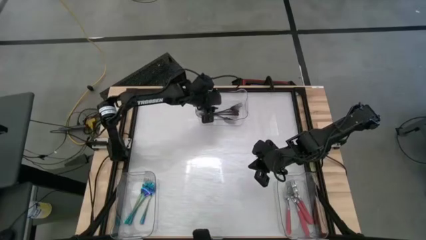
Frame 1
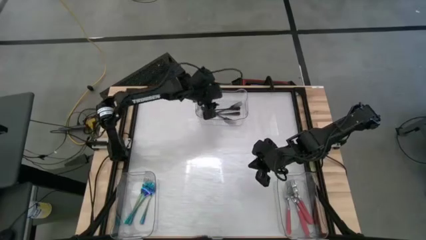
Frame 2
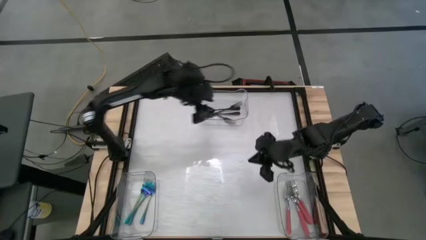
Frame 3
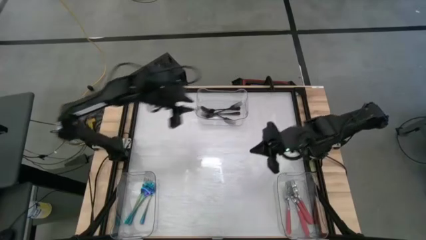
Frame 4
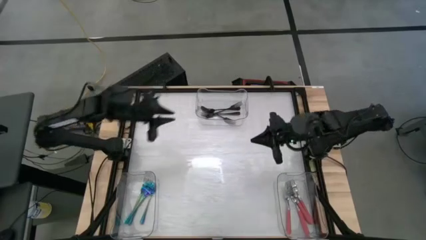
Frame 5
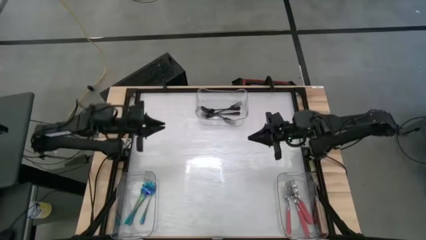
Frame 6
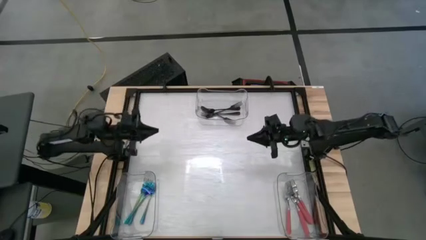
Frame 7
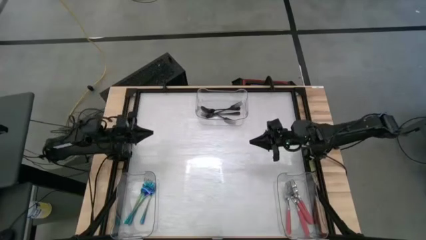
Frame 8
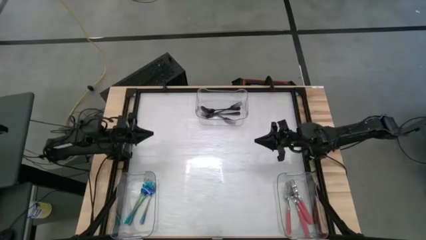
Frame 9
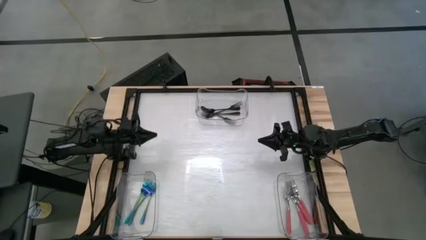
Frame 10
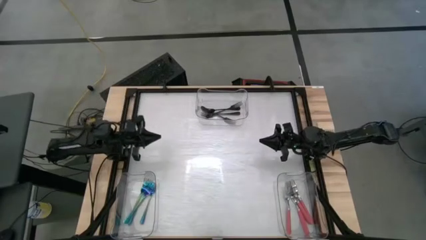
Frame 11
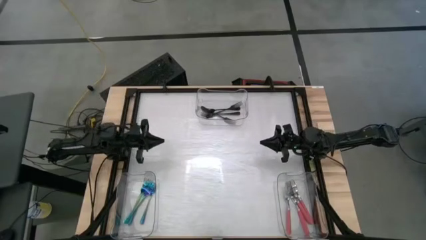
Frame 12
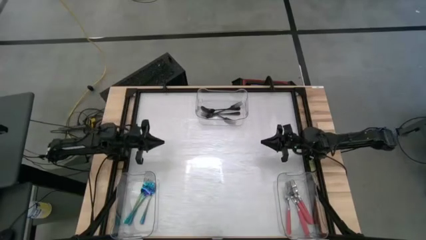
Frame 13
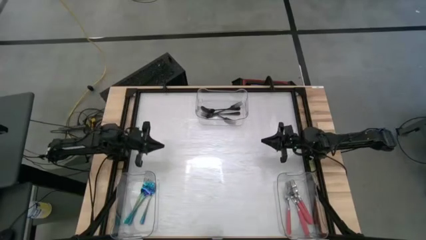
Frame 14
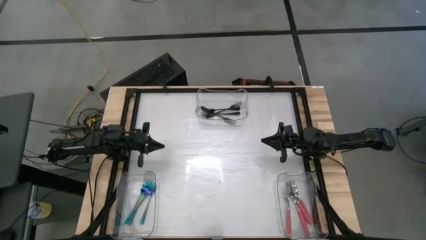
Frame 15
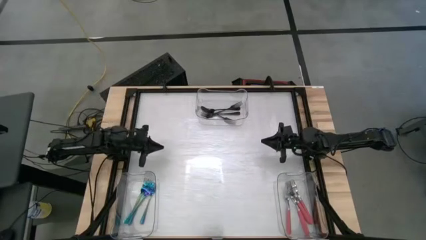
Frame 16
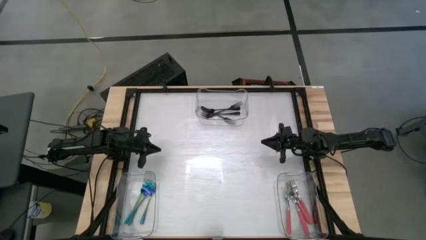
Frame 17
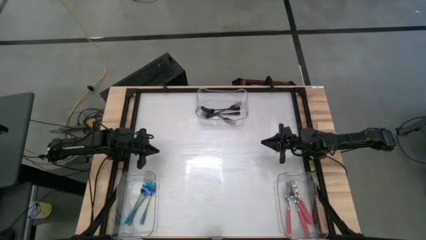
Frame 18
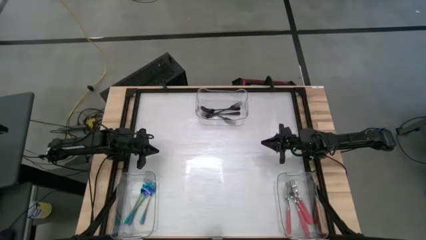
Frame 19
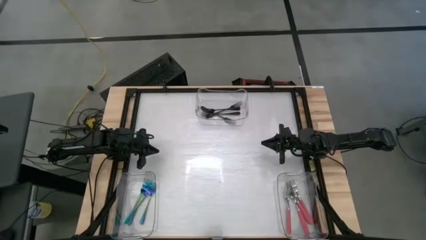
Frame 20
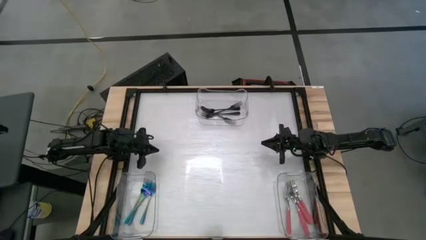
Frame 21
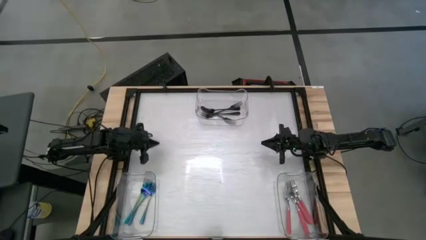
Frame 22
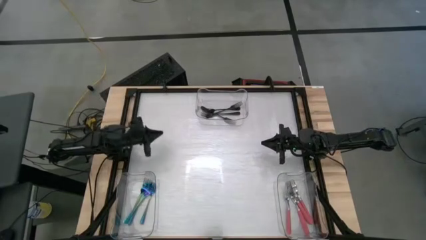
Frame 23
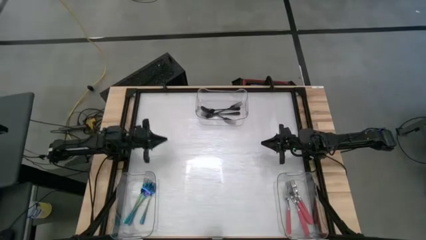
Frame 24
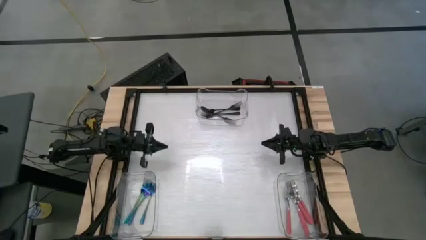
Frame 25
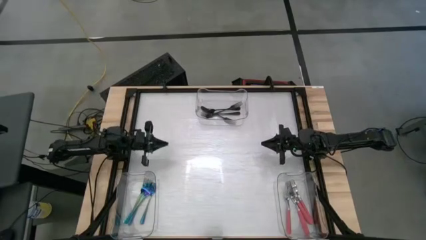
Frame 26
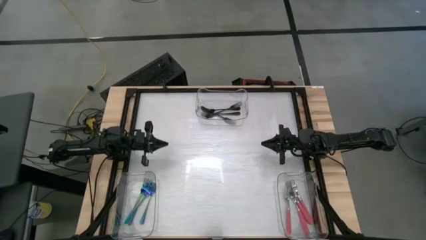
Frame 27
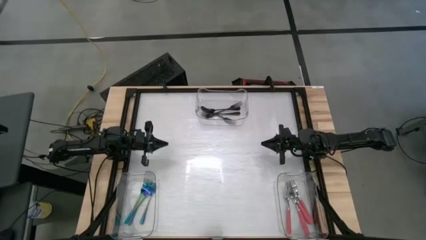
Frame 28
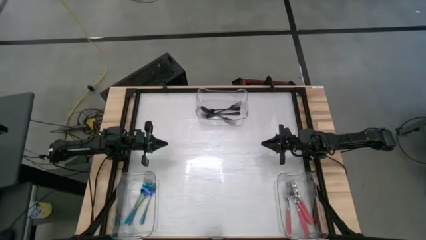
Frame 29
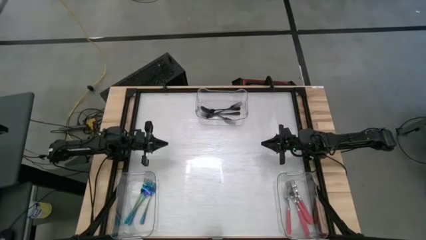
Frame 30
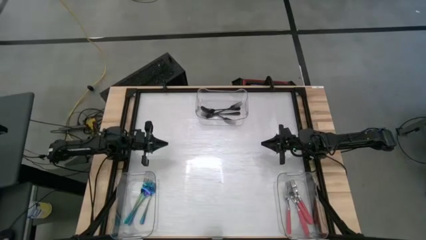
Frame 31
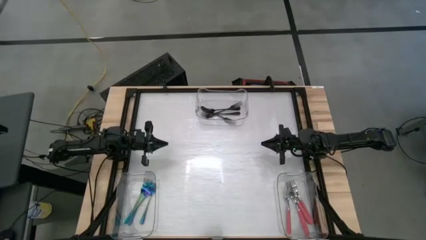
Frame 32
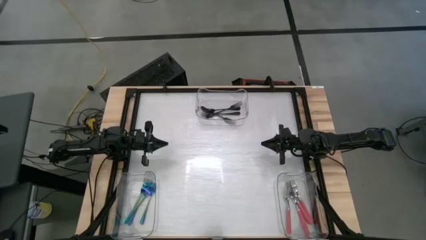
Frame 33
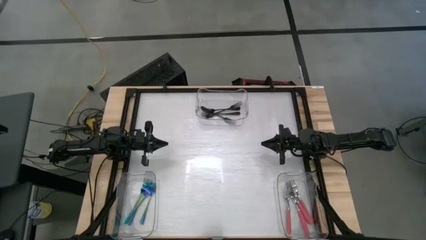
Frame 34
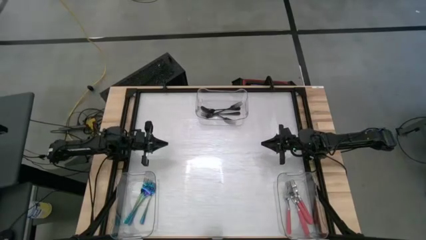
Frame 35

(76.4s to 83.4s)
Task: Sort silverware by color (type)
Return to Home Position

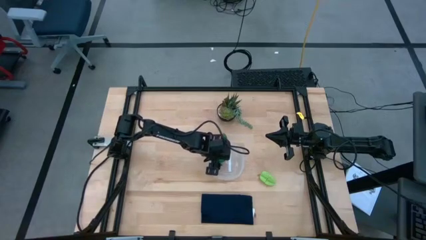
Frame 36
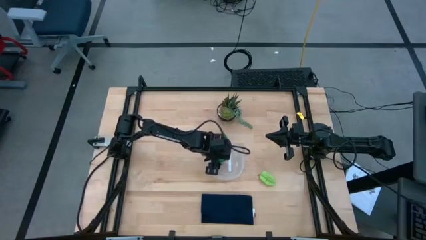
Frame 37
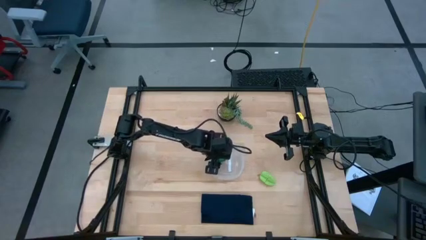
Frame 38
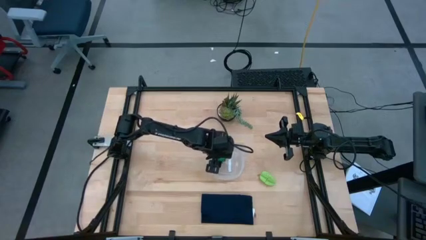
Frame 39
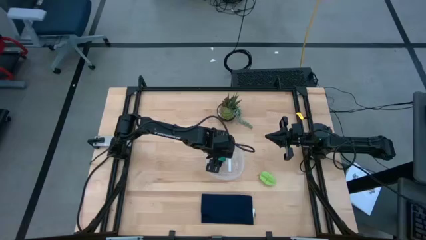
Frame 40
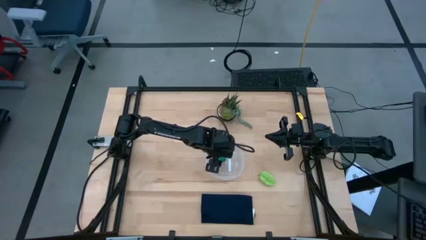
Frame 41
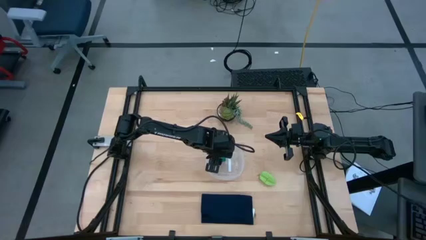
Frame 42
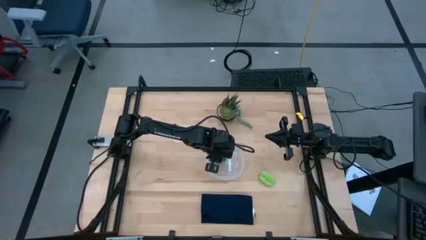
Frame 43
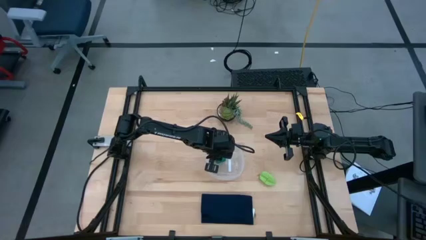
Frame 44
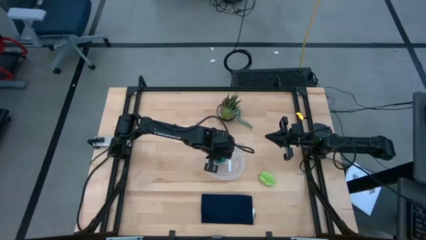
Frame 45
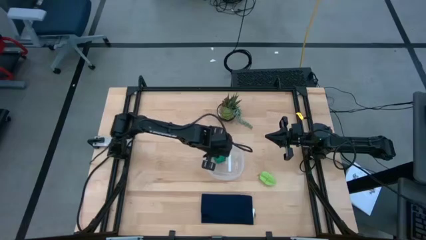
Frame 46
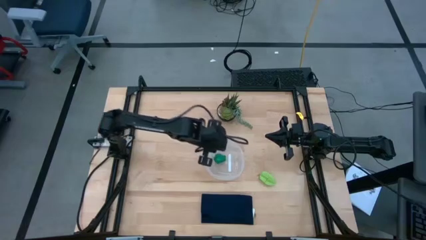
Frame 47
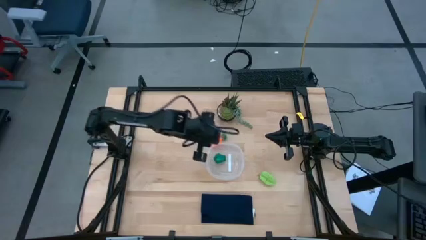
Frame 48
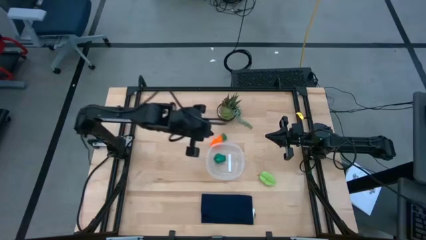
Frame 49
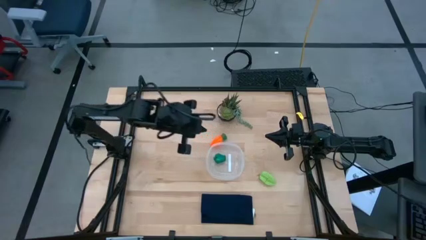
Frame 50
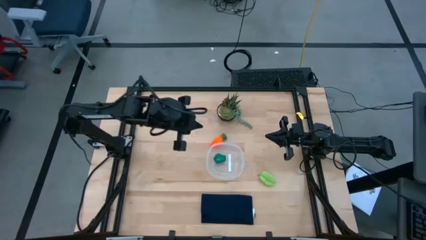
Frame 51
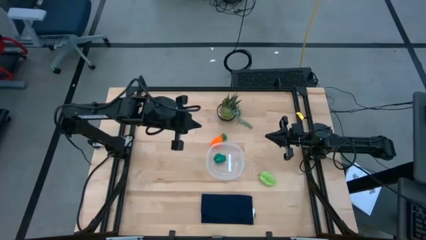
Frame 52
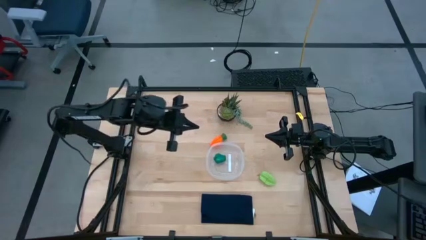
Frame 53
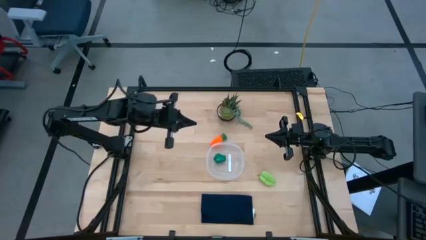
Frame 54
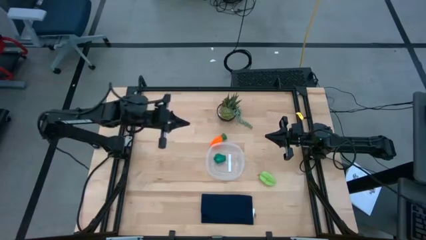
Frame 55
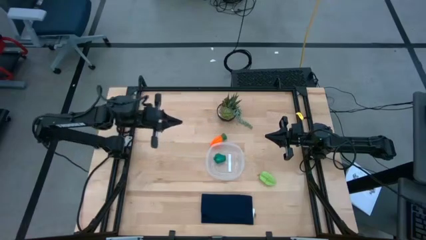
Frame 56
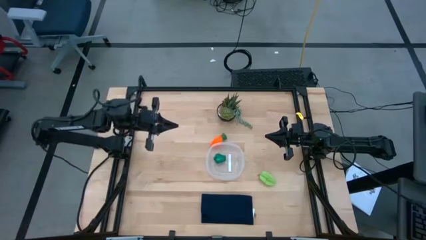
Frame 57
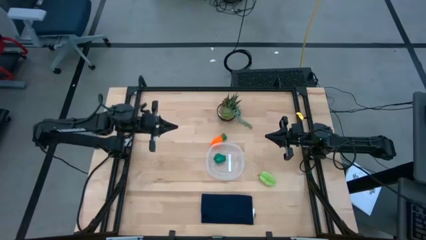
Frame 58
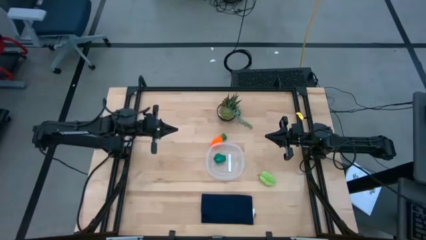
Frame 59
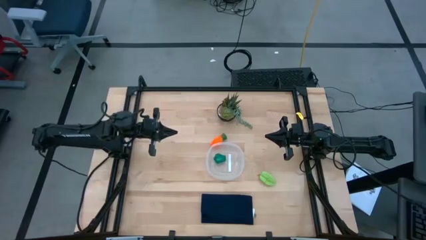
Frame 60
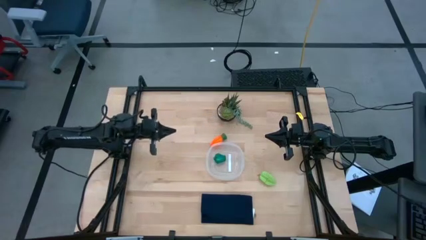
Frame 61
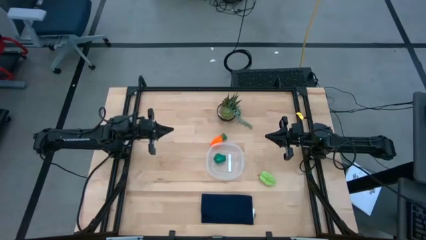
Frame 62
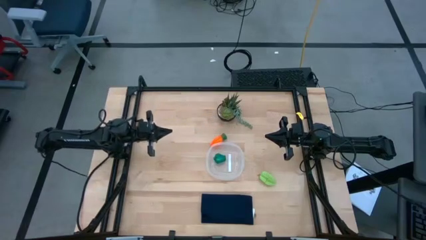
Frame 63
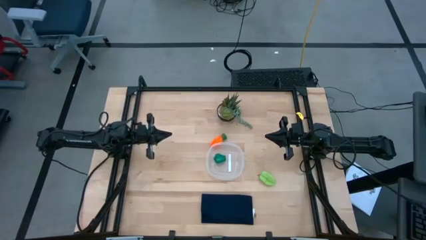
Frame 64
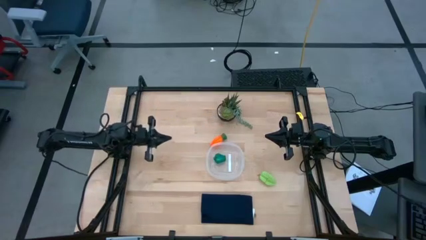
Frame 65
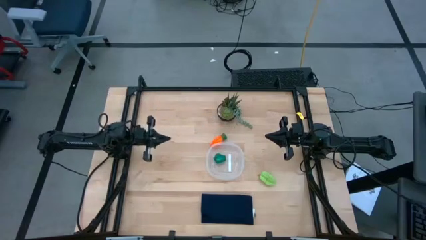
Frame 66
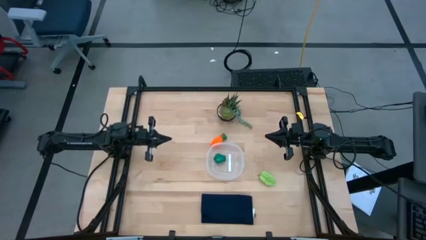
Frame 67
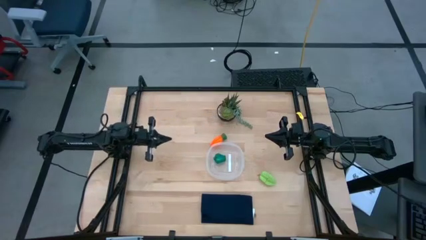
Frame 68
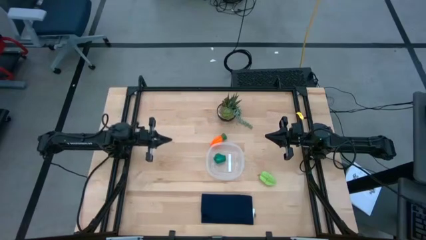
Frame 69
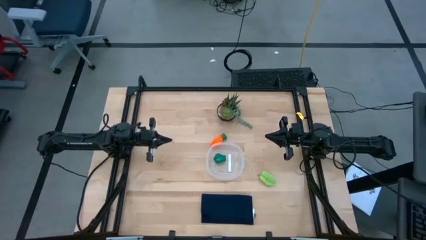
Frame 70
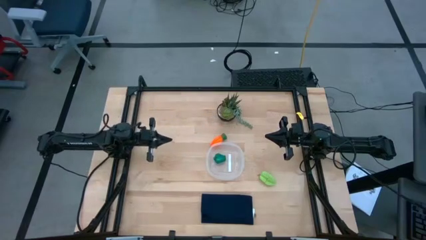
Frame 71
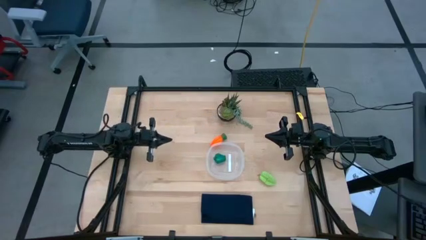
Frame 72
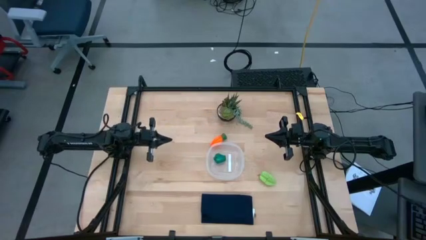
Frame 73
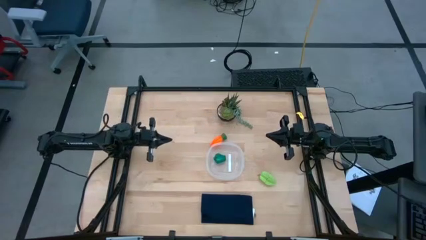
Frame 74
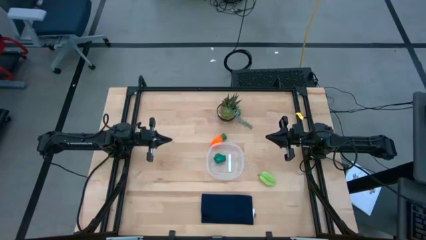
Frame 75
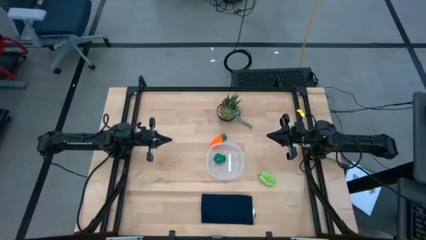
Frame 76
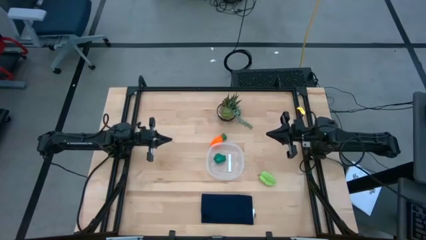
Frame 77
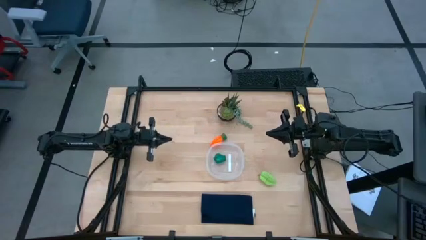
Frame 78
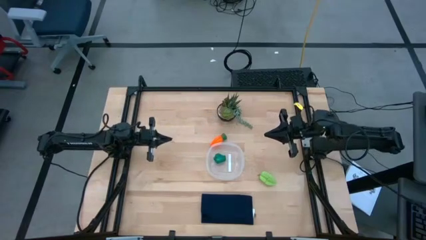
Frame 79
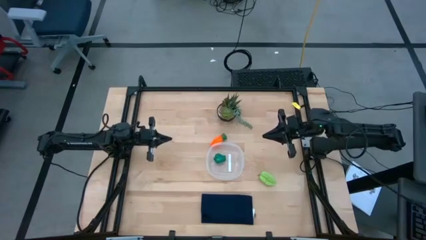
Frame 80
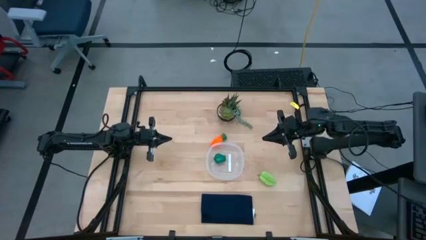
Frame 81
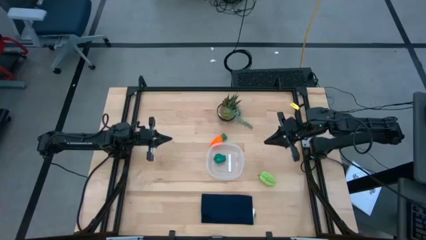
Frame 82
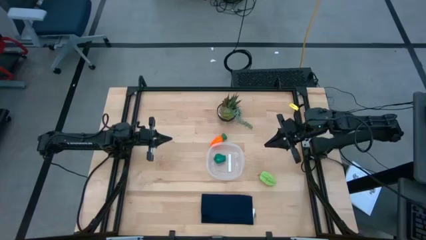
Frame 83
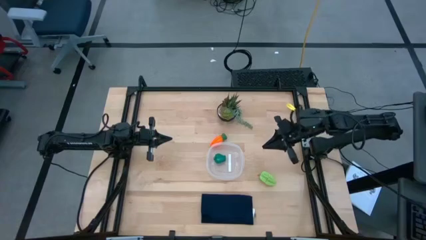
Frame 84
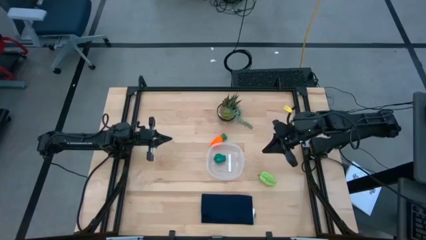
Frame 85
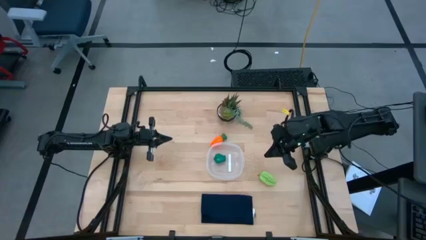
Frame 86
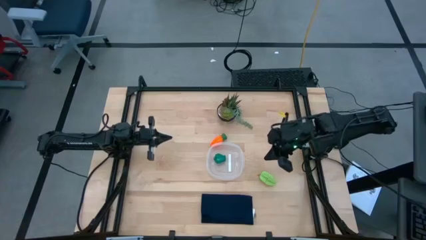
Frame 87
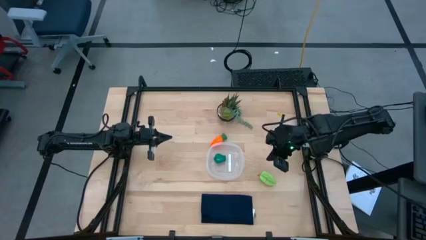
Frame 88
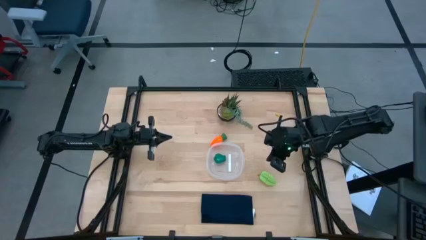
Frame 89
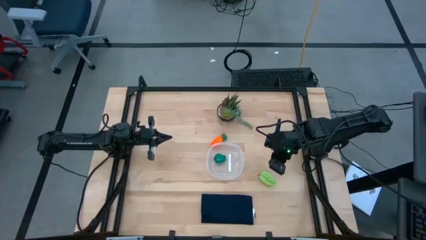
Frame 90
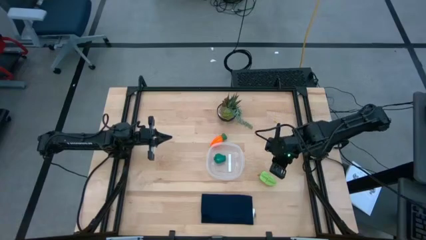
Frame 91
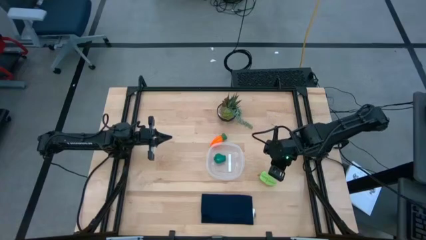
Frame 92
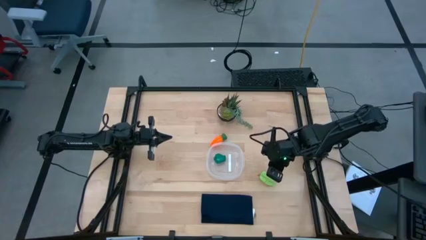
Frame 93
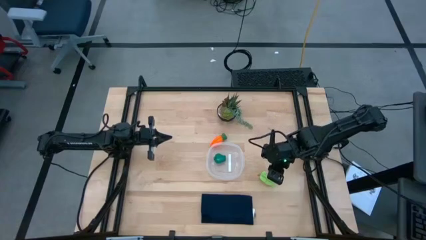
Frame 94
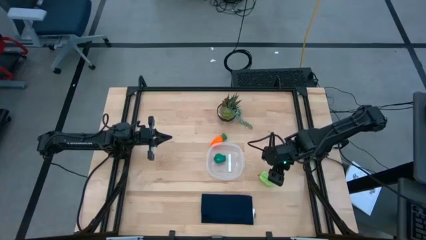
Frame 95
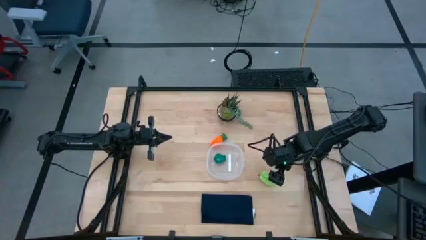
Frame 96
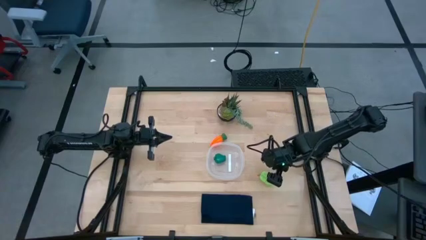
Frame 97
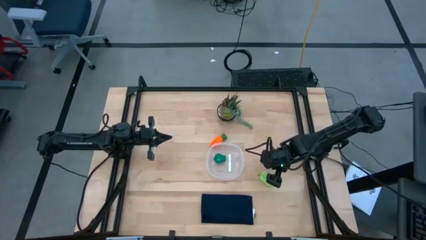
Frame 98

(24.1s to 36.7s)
Task: Pick and placing Produce into tupperware
Put the star fruit into the transparent bin
